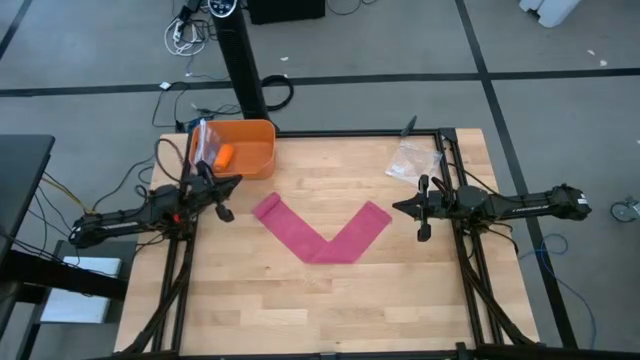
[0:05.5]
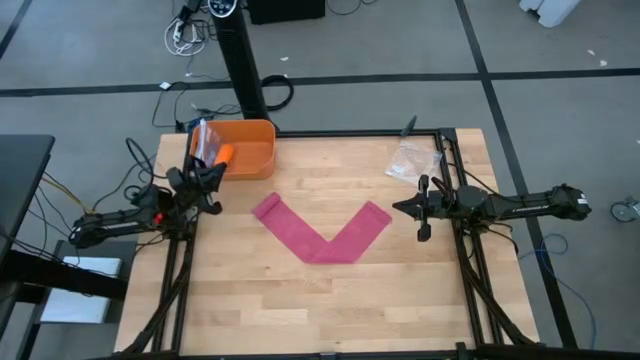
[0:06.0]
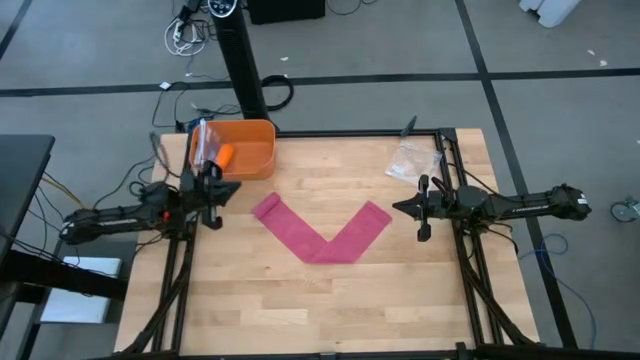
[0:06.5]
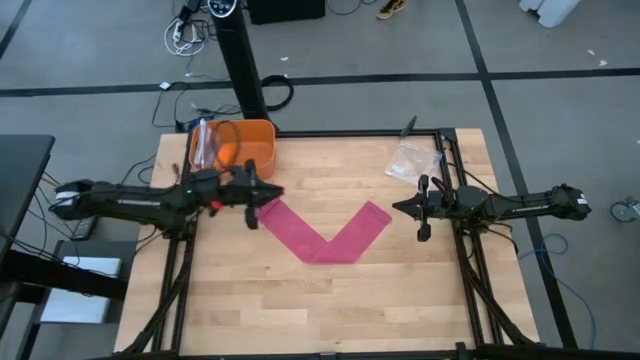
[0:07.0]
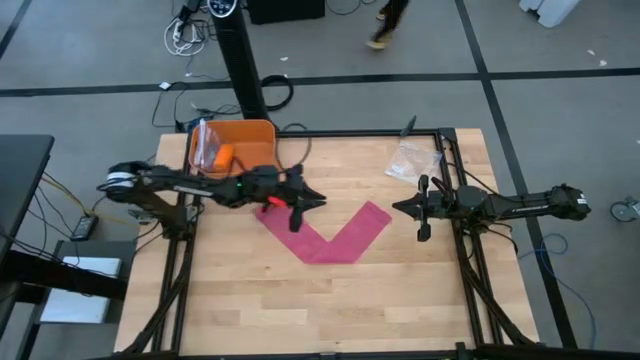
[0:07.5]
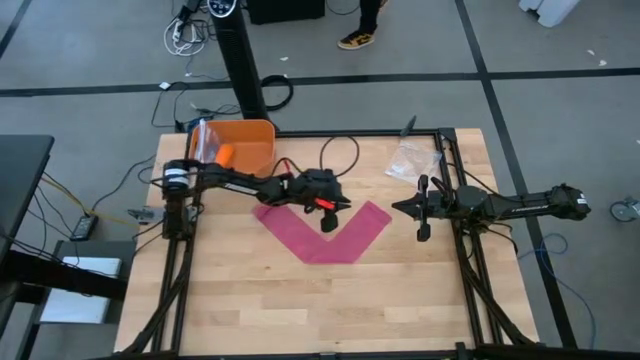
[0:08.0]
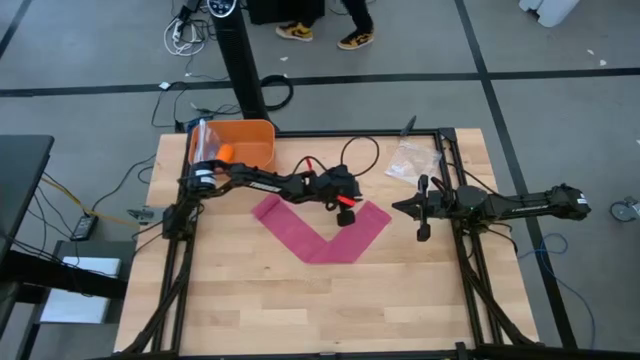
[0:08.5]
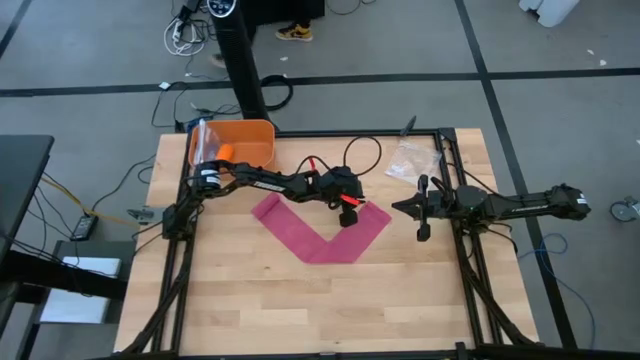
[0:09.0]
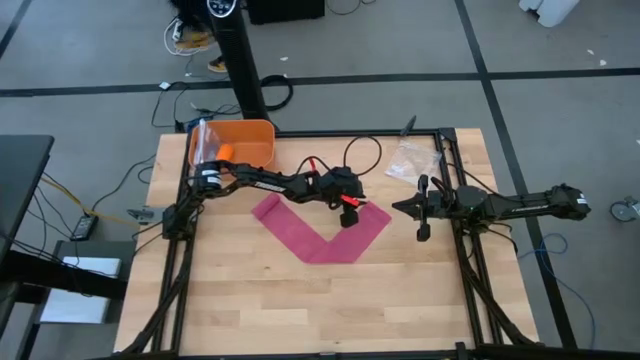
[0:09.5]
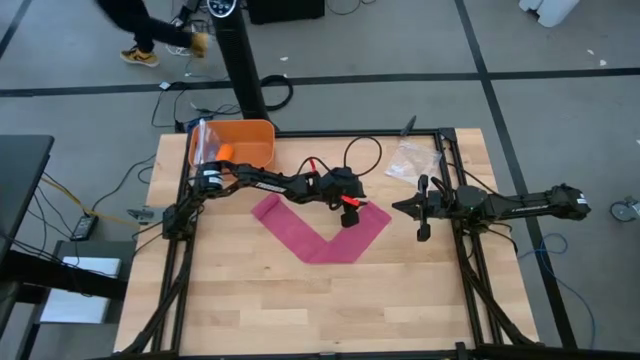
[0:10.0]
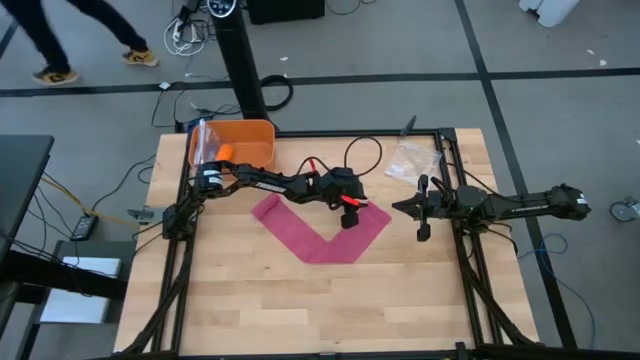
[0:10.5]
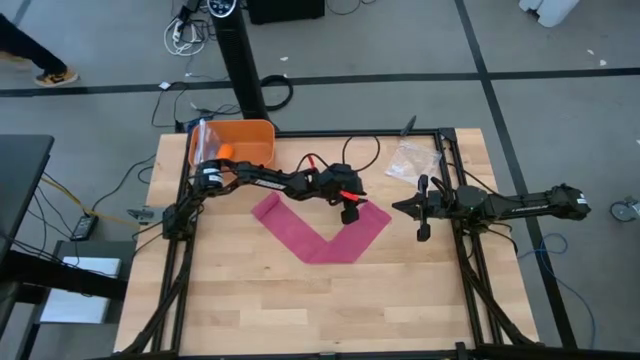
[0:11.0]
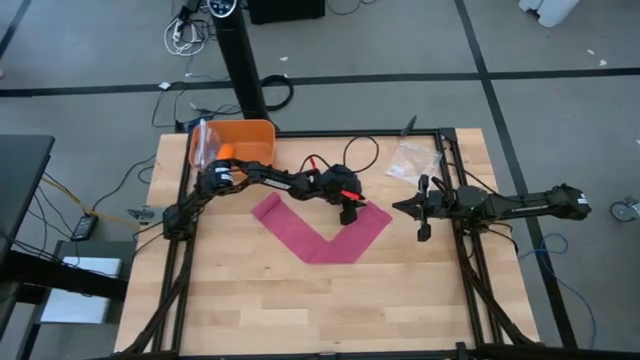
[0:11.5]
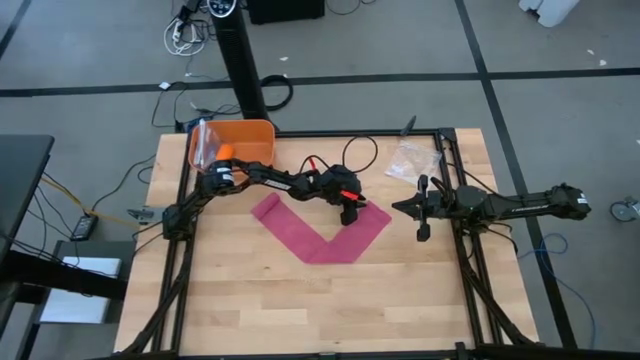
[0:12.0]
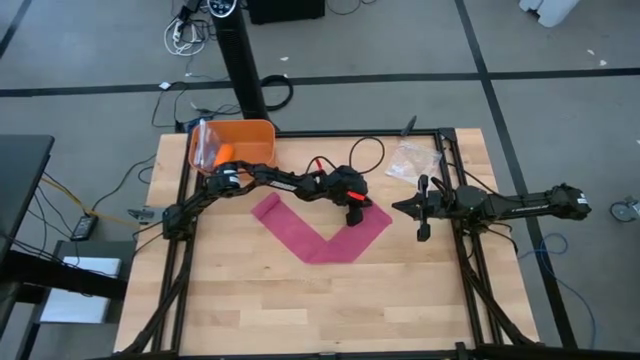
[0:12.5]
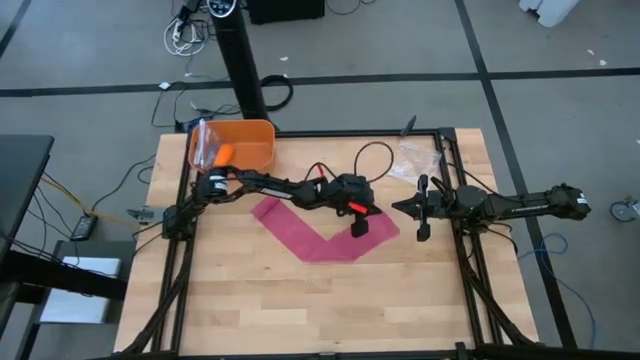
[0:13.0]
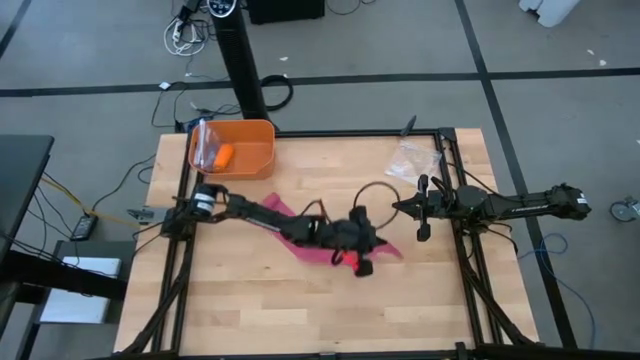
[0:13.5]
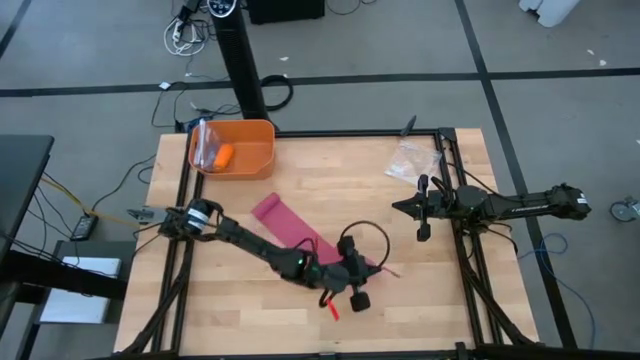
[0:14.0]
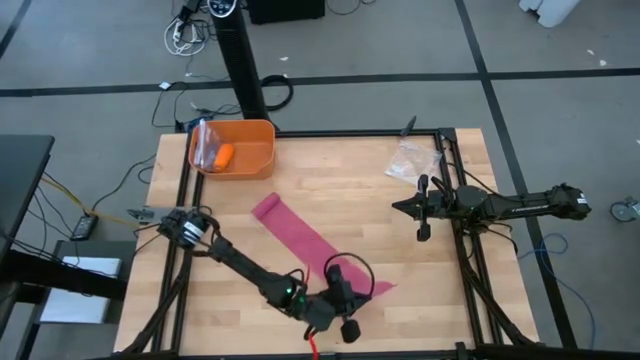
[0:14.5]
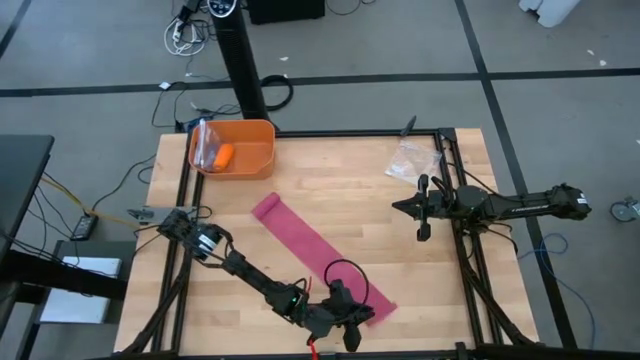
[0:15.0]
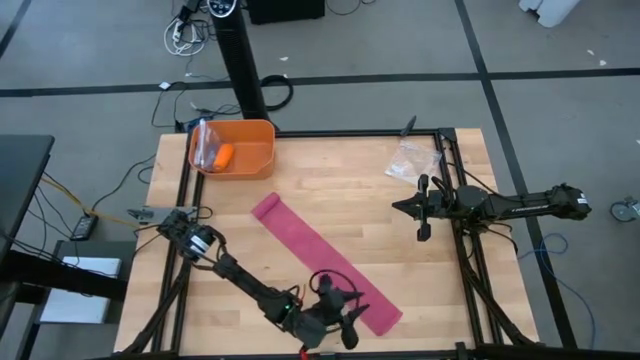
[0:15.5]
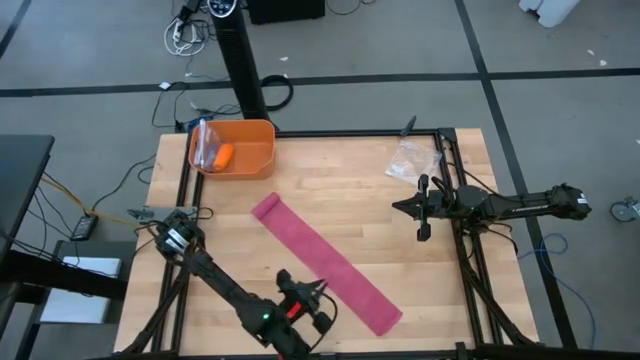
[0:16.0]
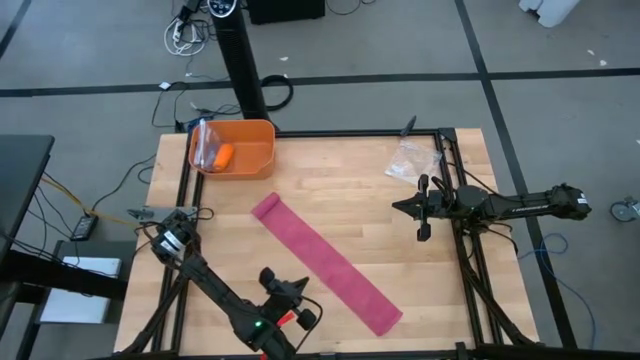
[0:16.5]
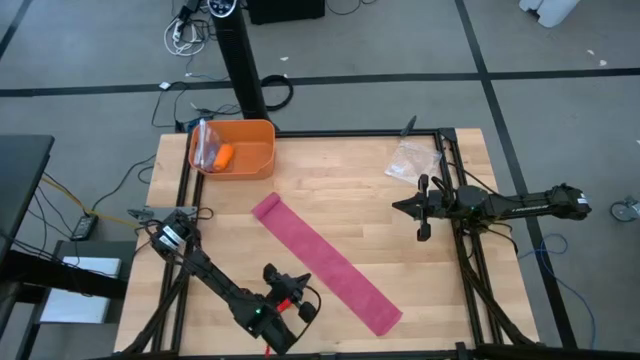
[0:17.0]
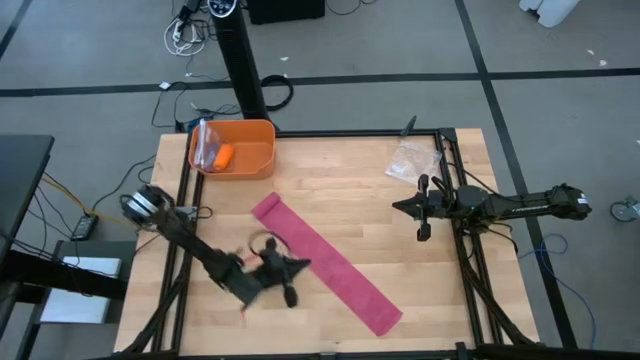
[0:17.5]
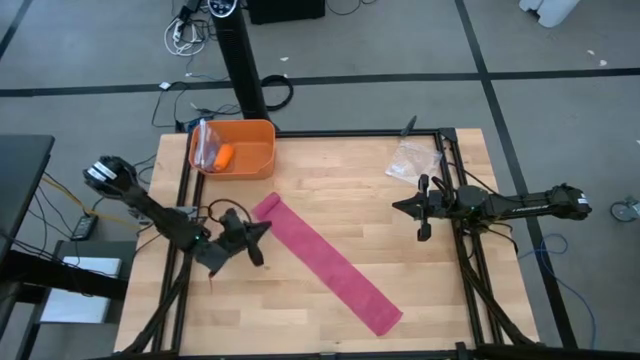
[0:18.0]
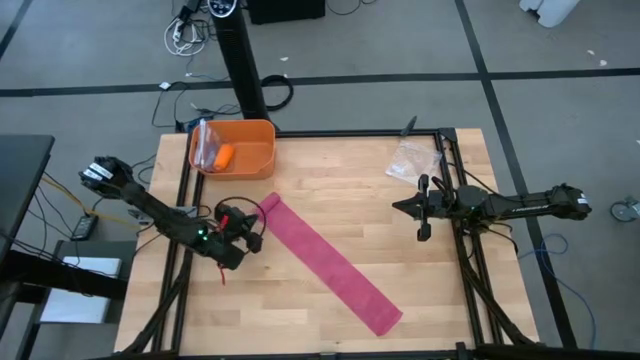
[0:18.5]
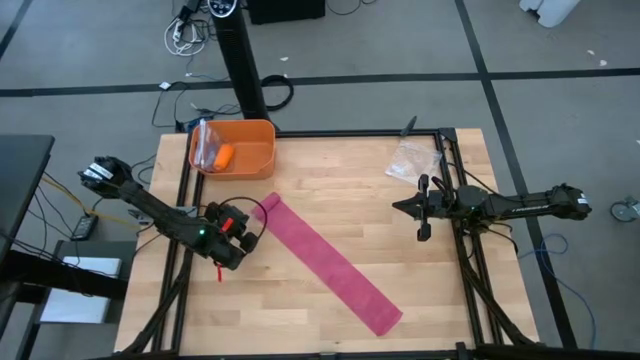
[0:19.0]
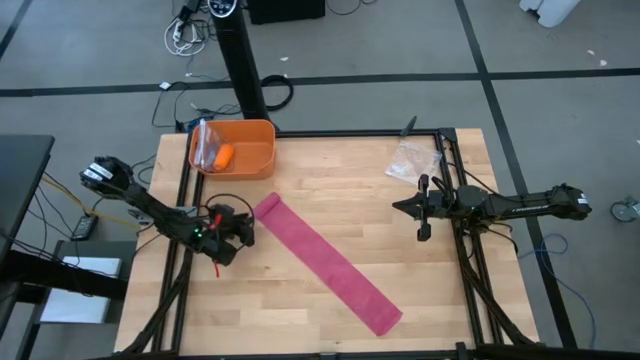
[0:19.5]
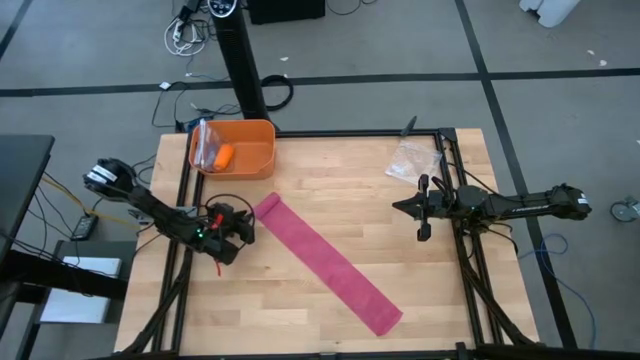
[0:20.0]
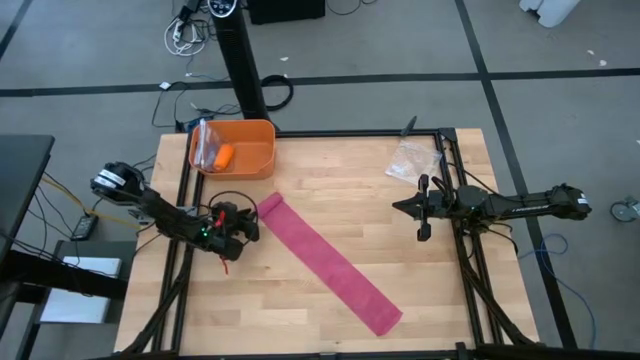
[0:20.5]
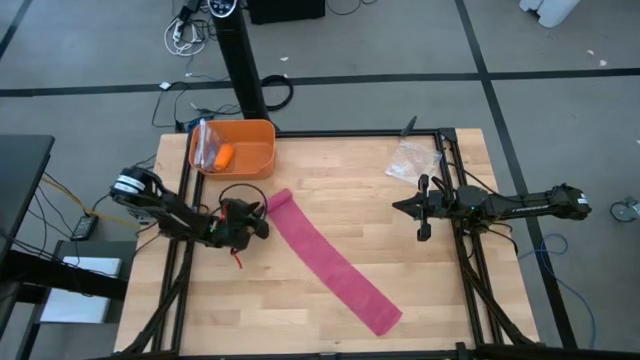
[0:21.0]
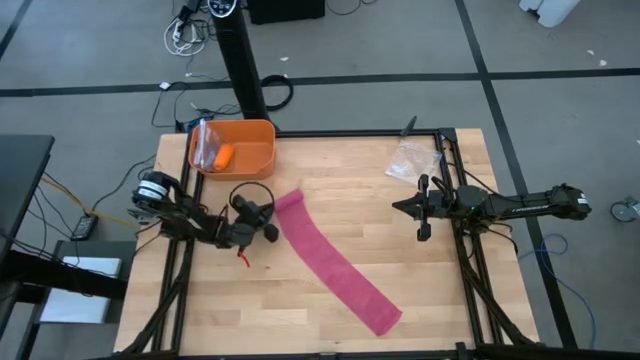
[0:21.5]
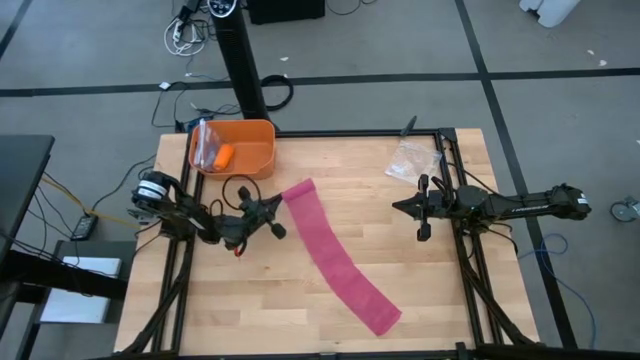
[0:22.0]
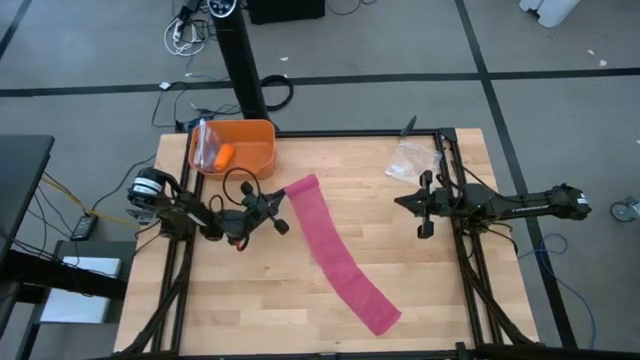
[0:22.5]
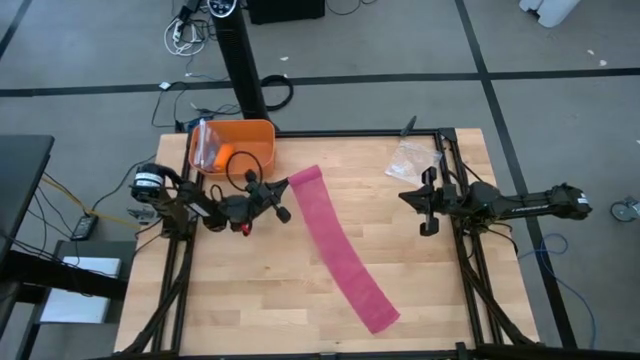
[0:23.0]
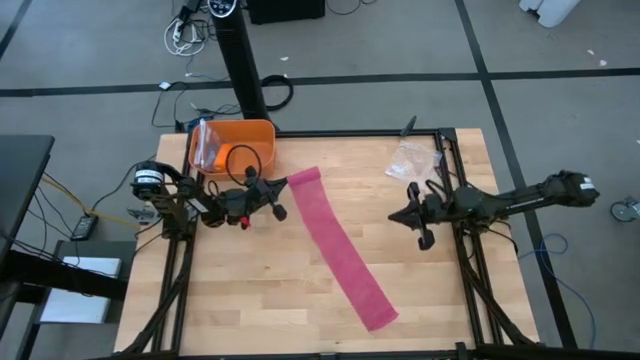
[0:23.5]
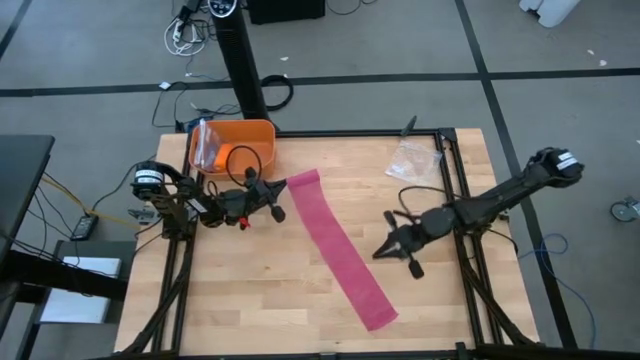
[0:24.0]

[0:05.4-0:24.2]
Task: Roll bandage
Roll the pink bandage
